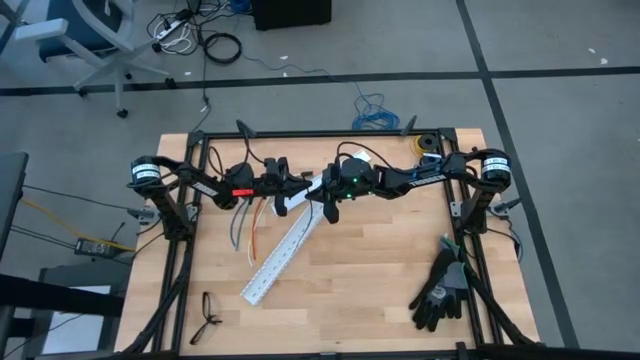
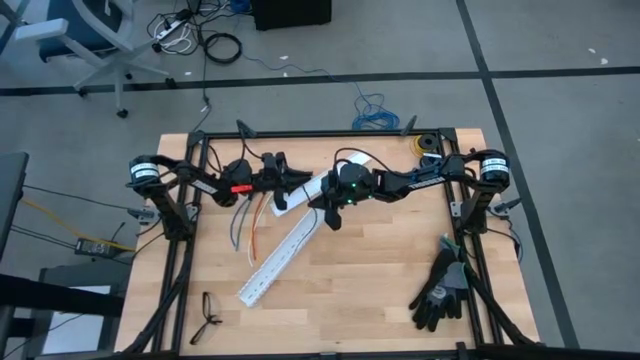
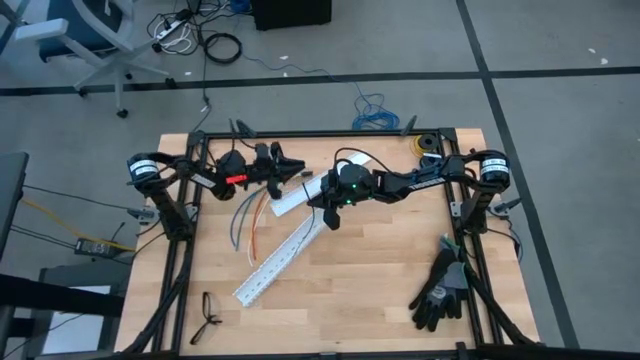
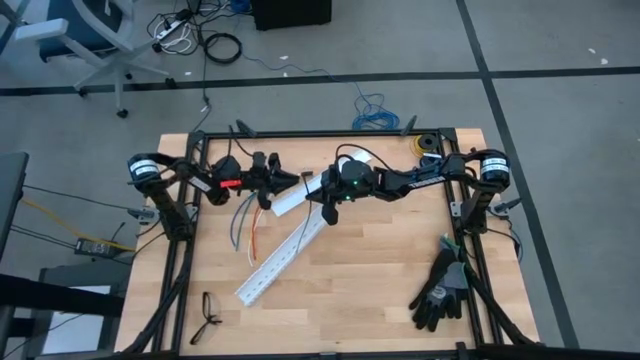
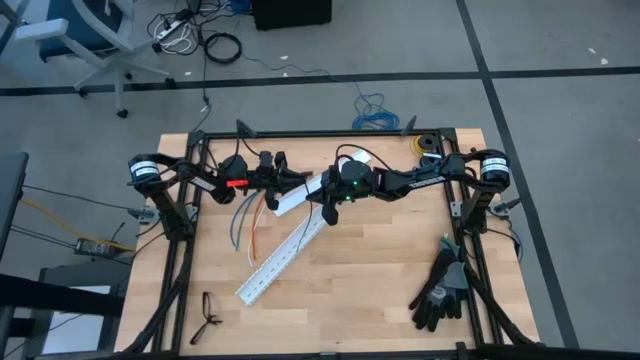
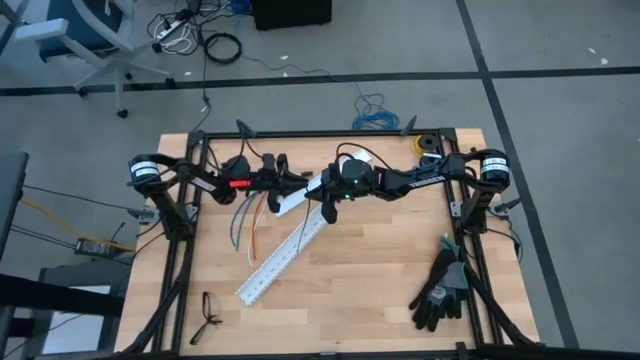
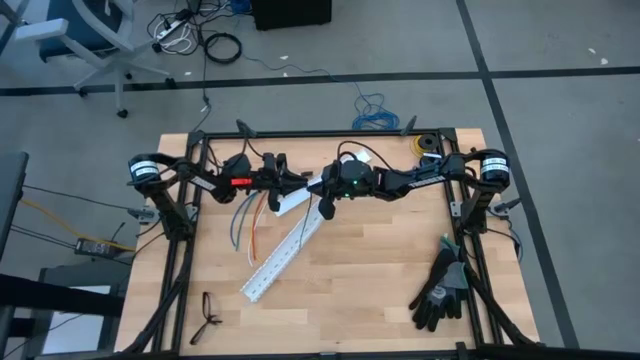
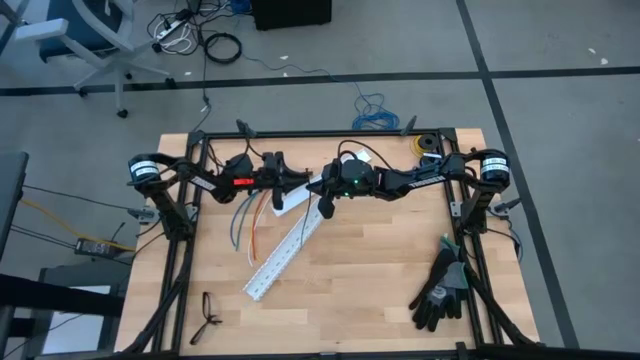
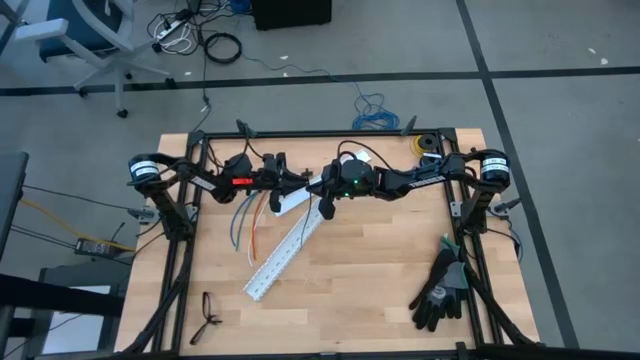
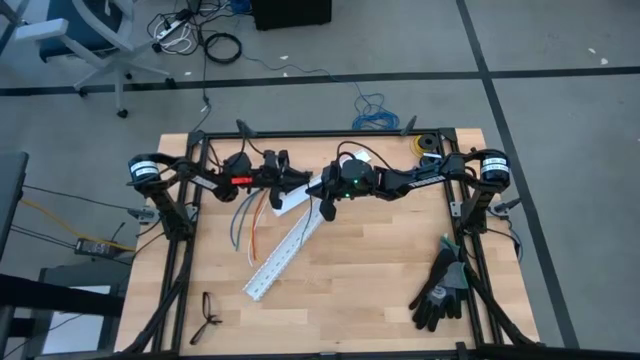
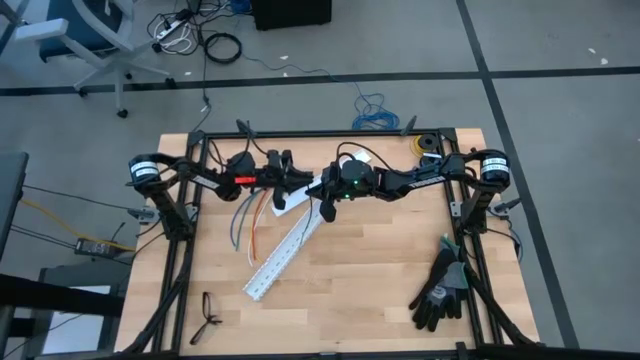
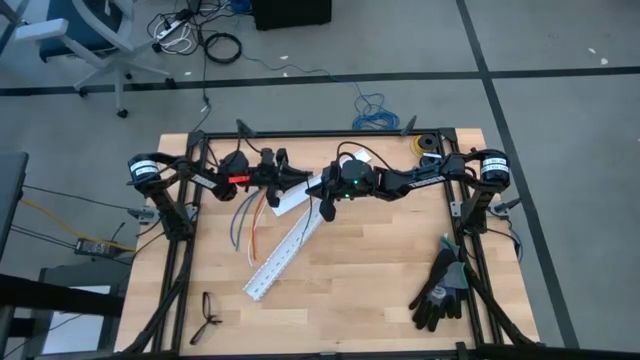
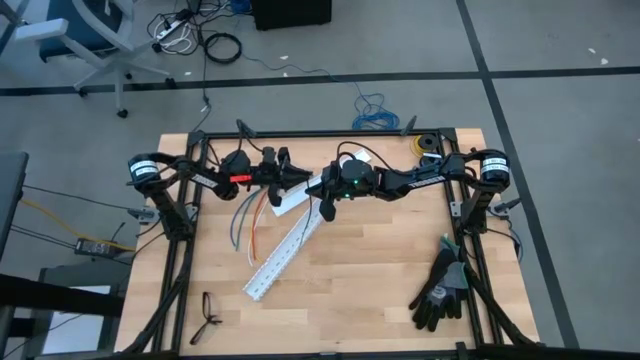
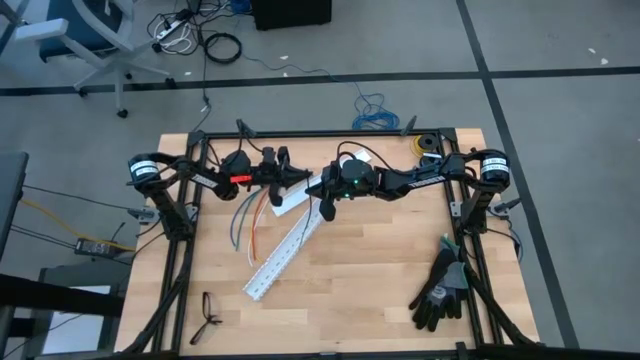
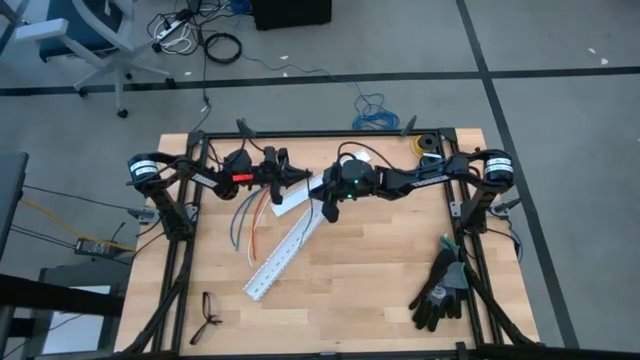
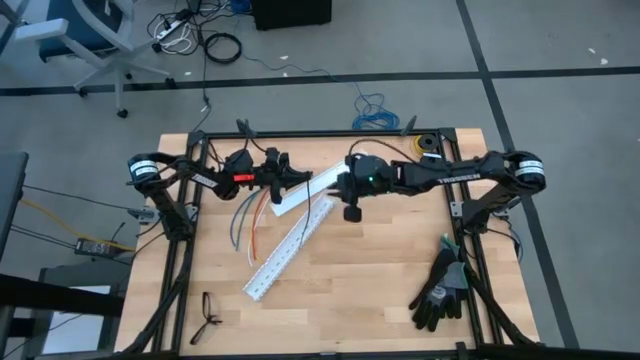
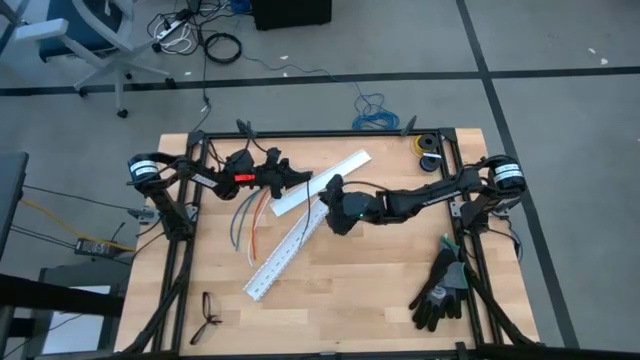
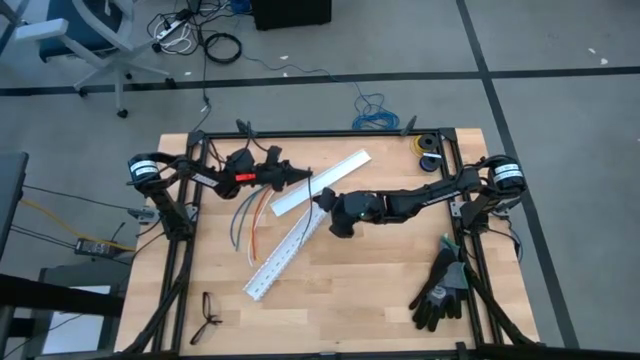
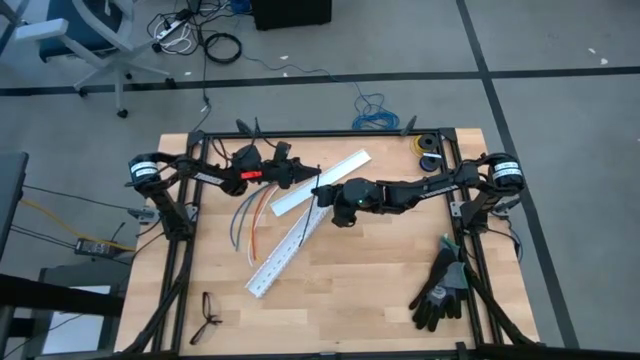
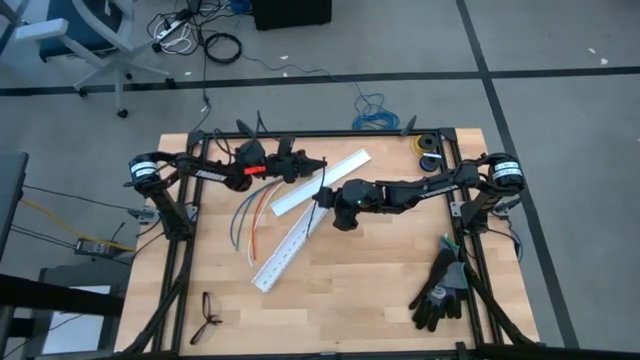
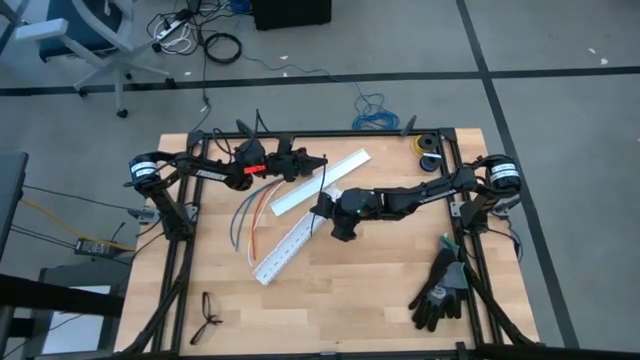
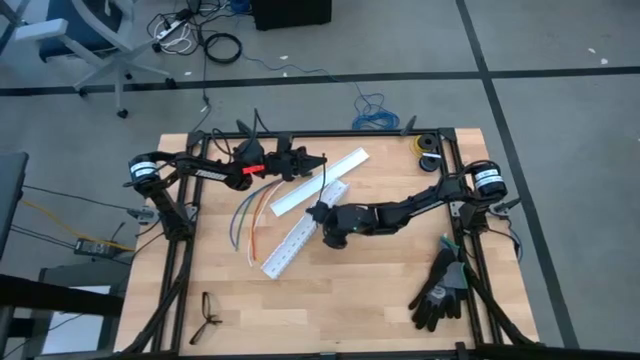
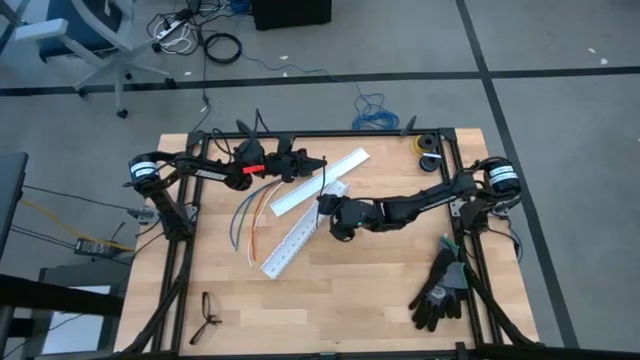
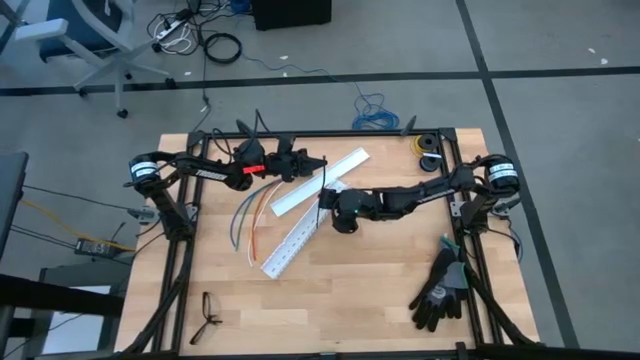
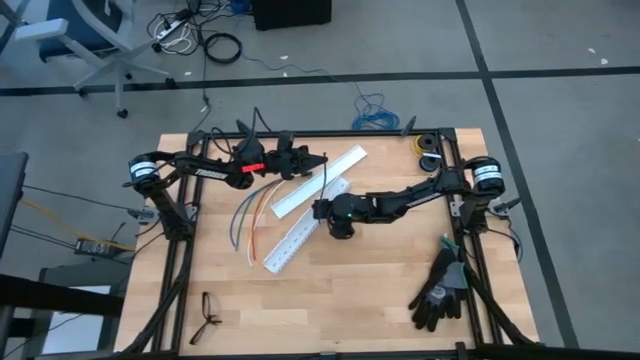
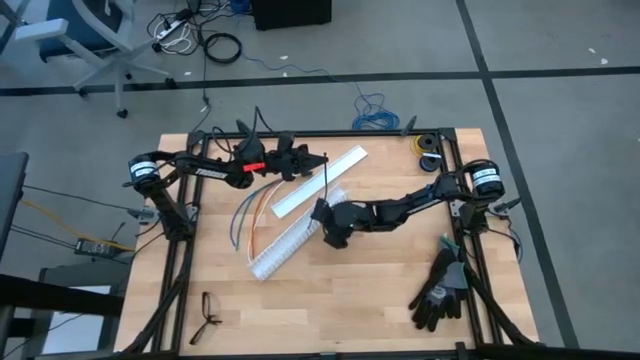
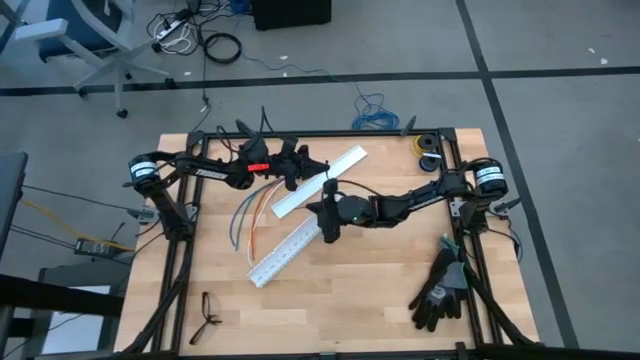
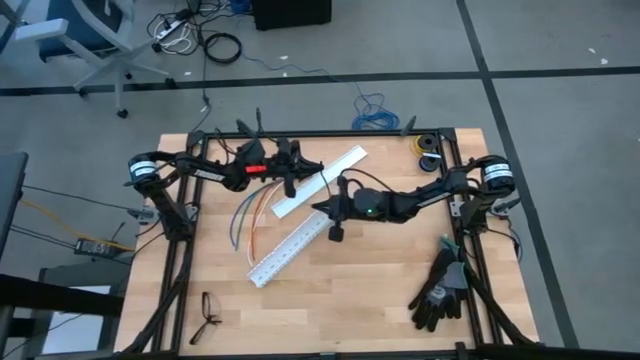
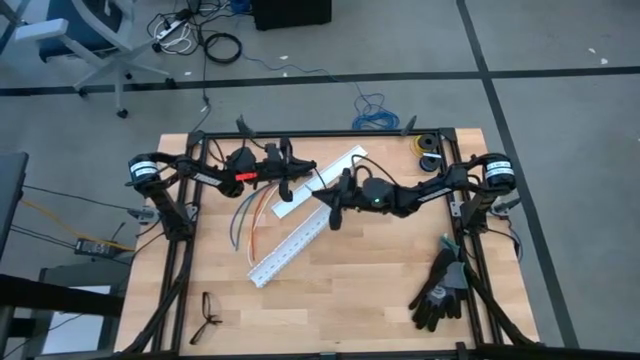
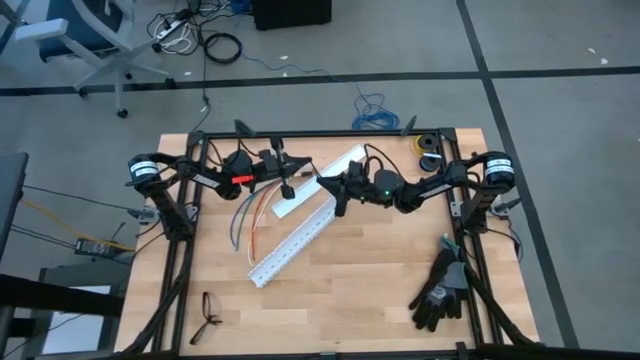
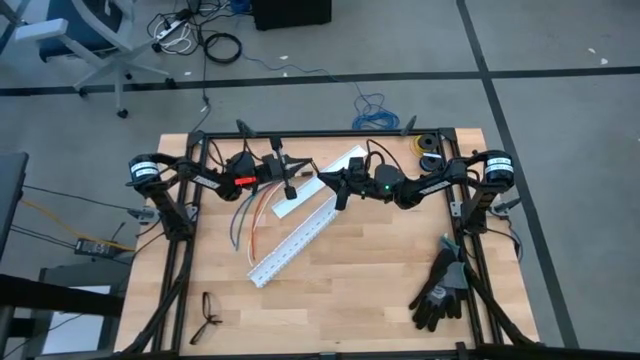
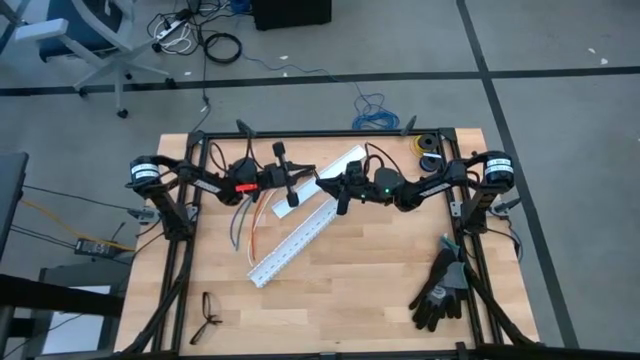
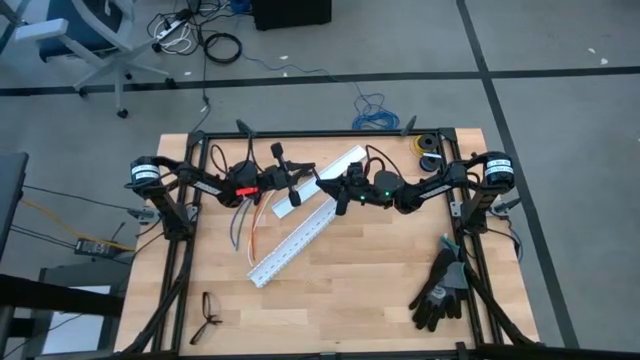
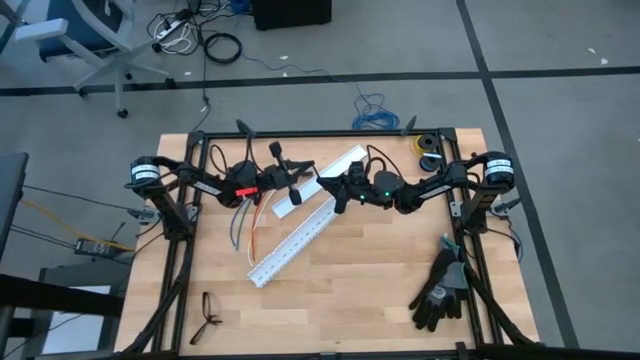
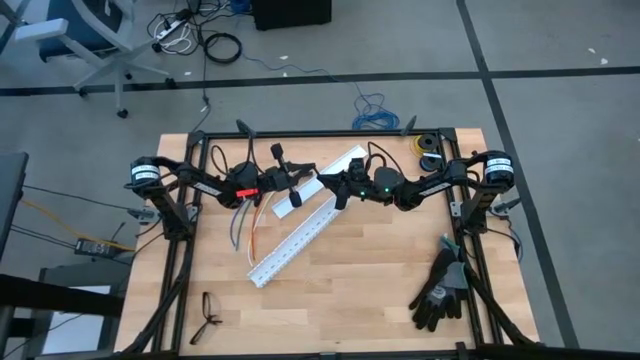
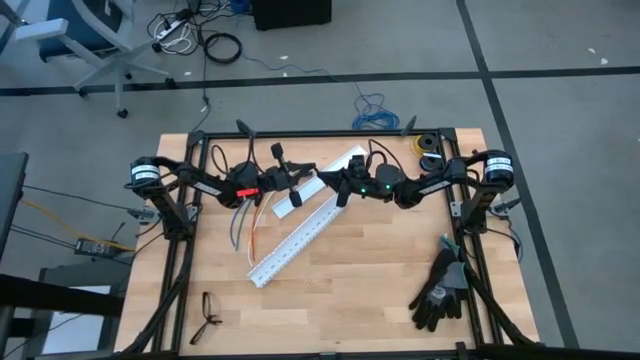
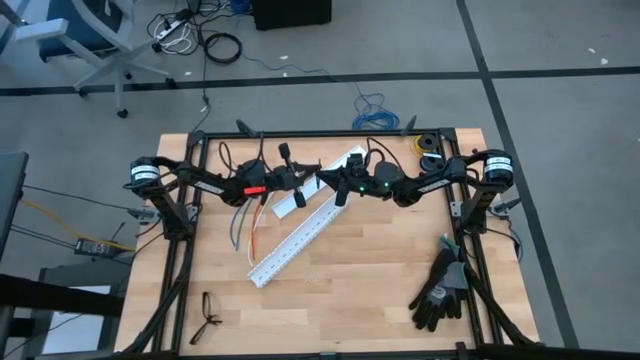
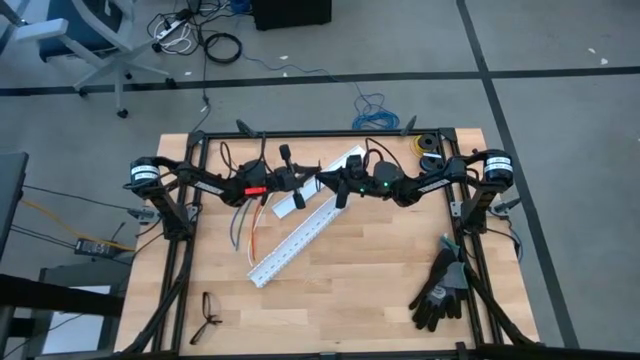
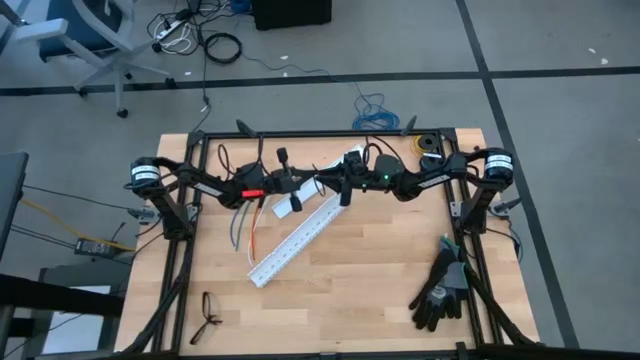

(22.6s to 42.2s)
Task: Ziptie cables
Wrap the cable wires with the black zip tie
